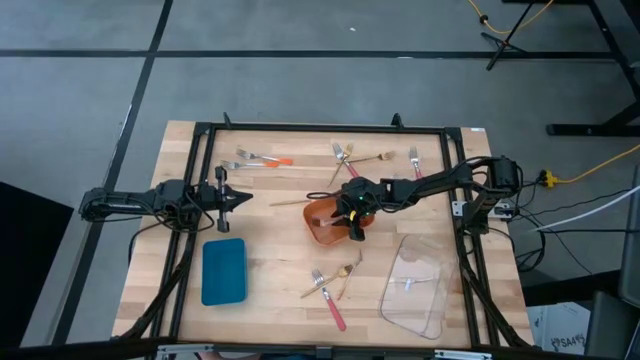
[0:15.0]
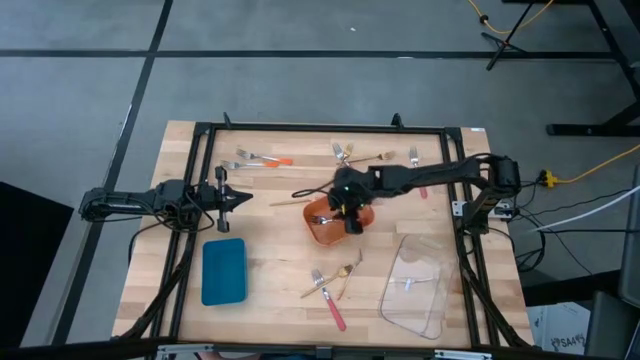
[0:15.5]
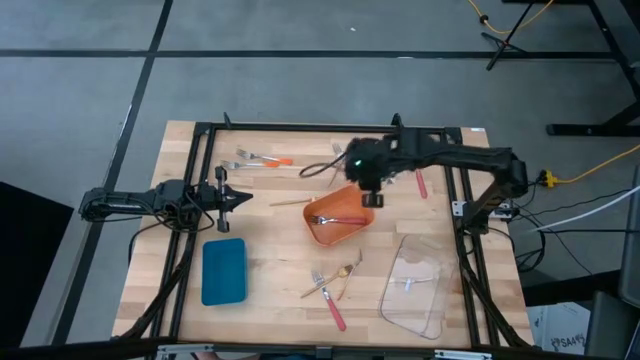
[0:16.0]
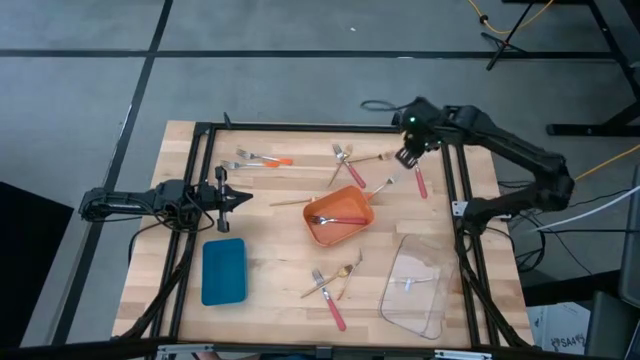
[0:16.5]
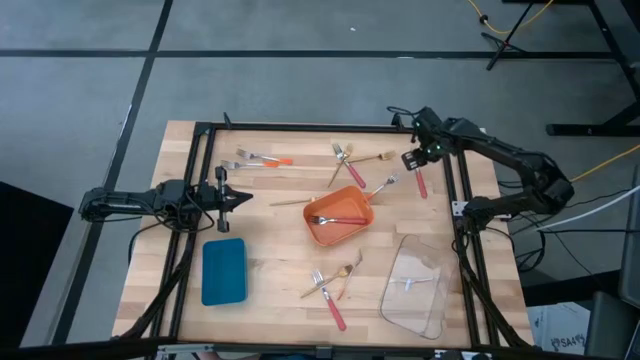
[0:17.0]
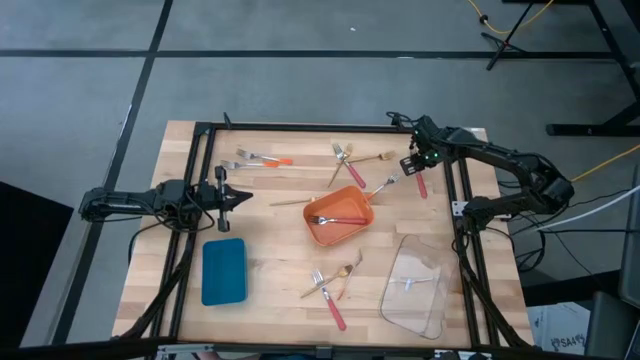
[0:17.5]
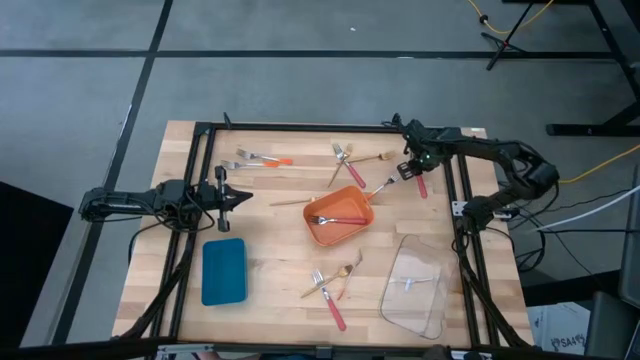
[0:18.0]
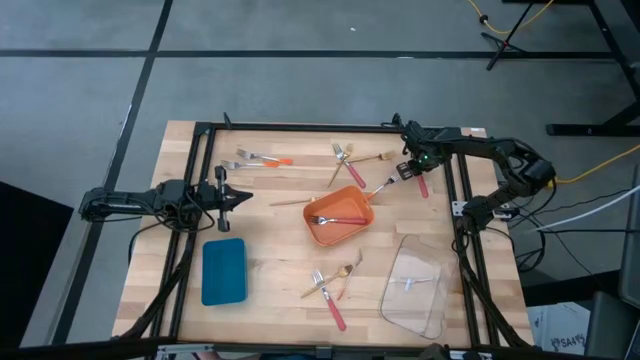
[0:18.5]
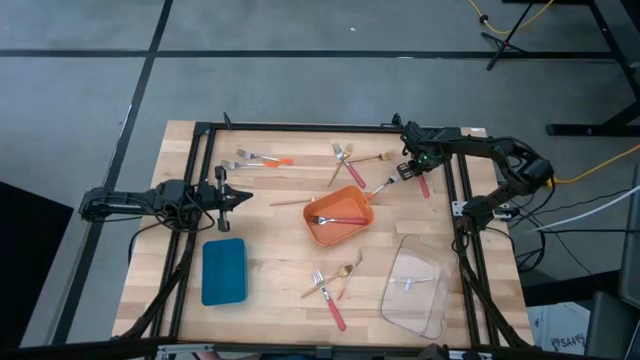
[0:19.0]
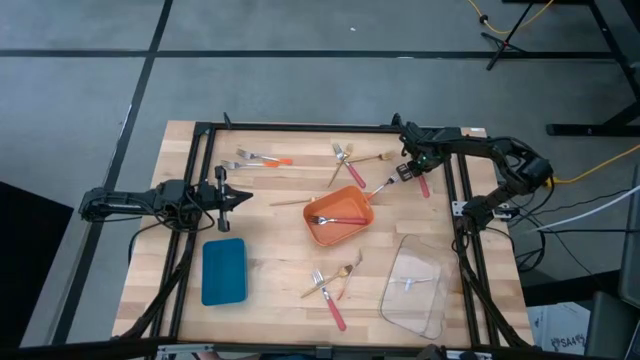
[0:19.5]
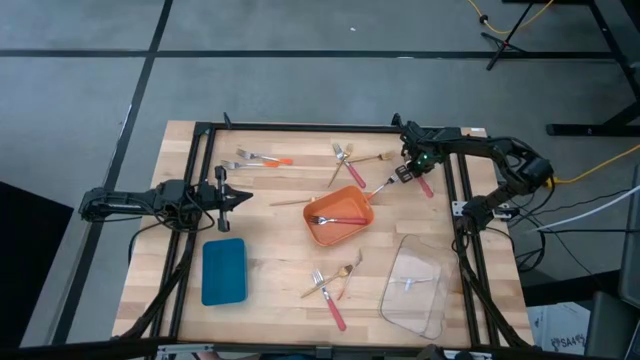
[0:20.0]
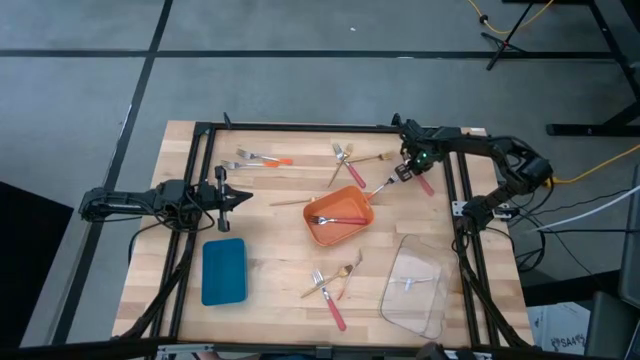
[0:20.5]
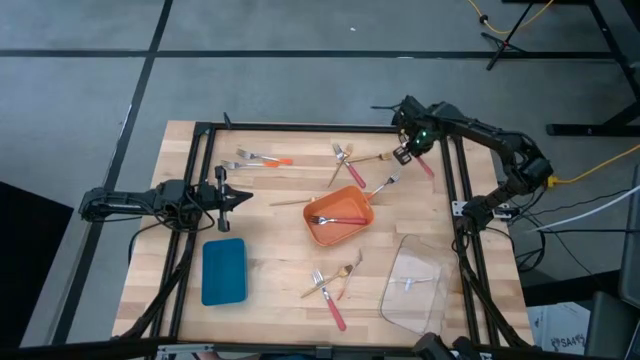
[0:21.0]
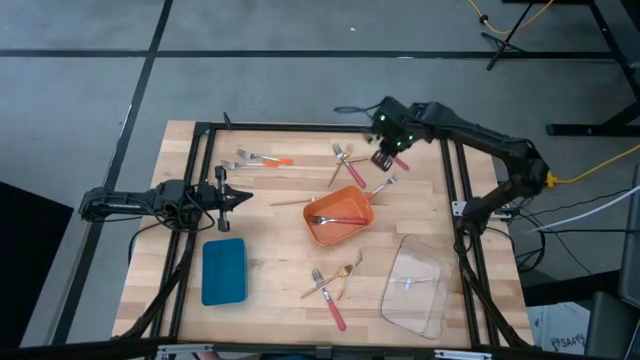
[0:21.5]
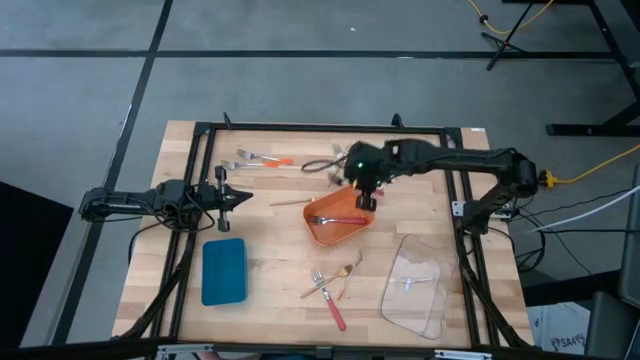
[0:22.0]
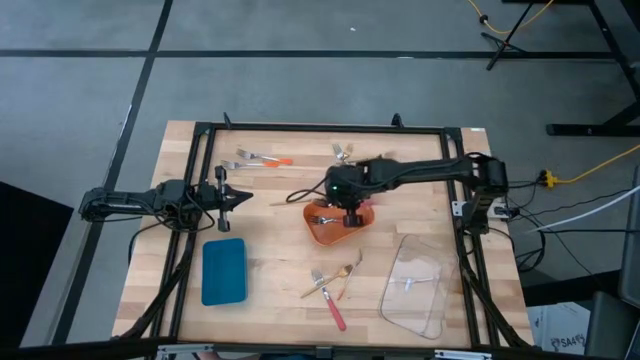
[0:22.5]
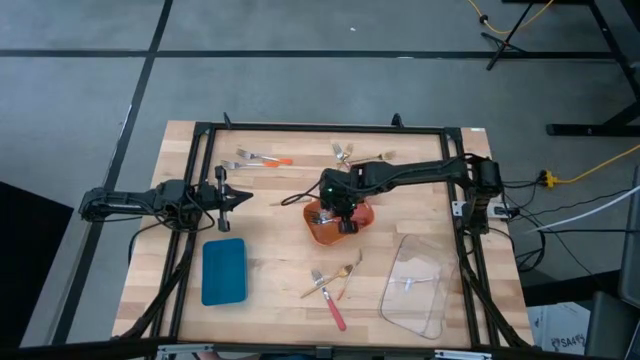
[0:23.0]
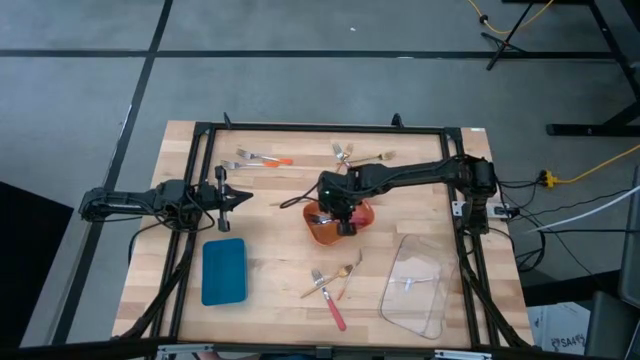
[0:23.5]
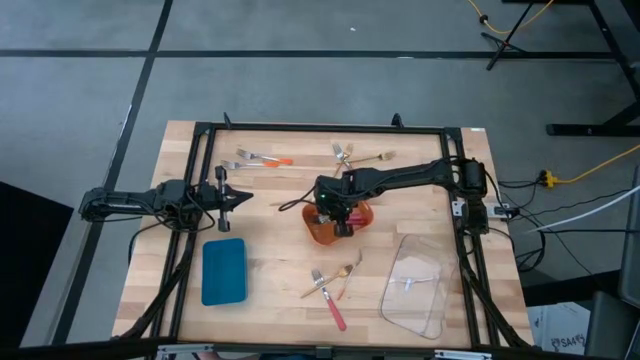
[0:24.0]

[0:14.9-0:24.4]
Task: Sort silverware by color (type)
Put the pink fork into the orange bin

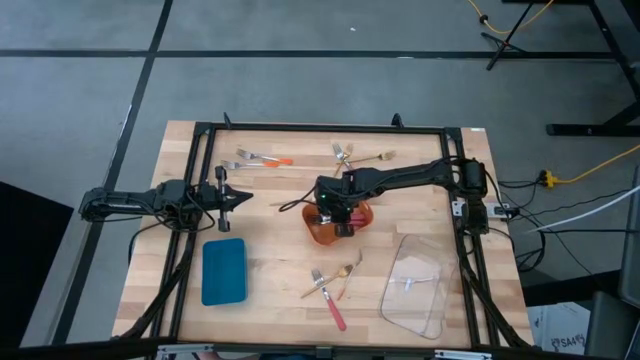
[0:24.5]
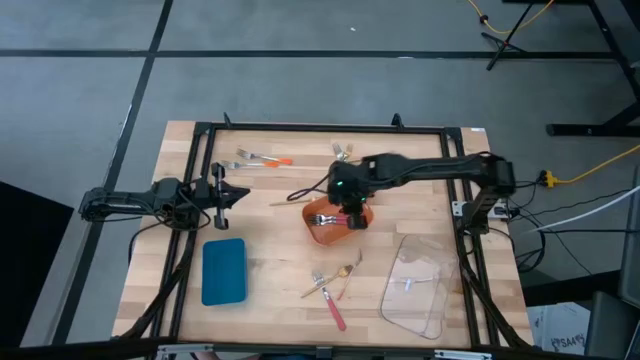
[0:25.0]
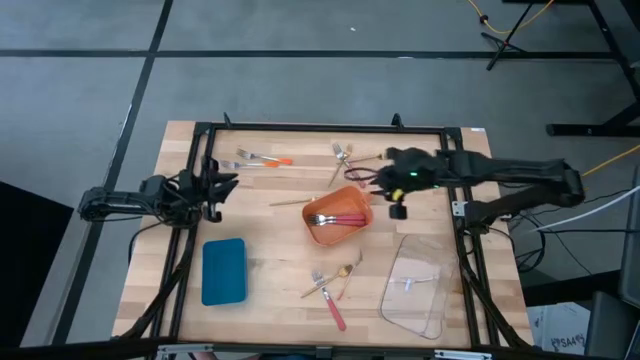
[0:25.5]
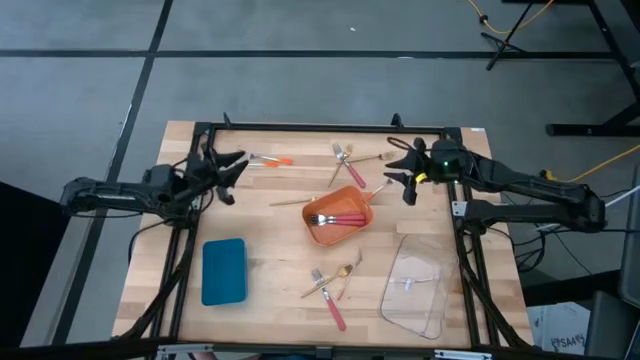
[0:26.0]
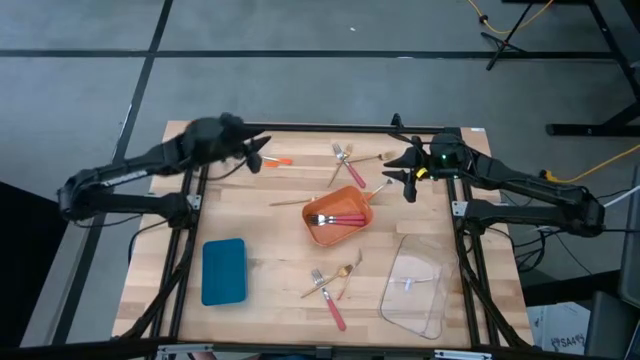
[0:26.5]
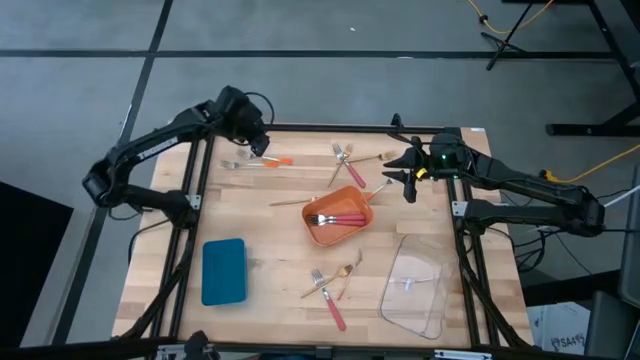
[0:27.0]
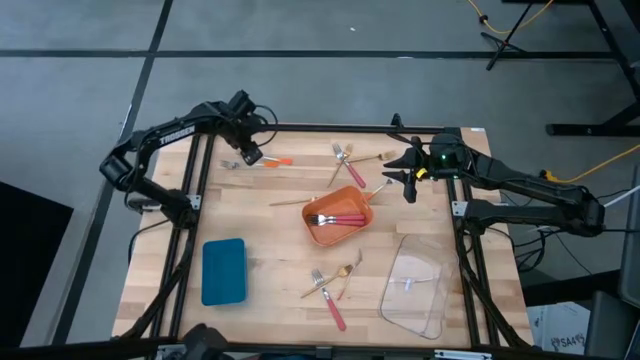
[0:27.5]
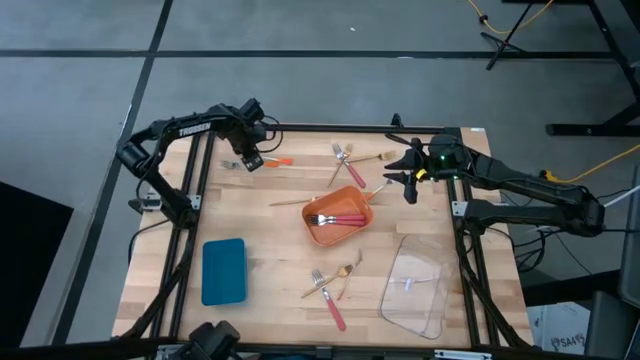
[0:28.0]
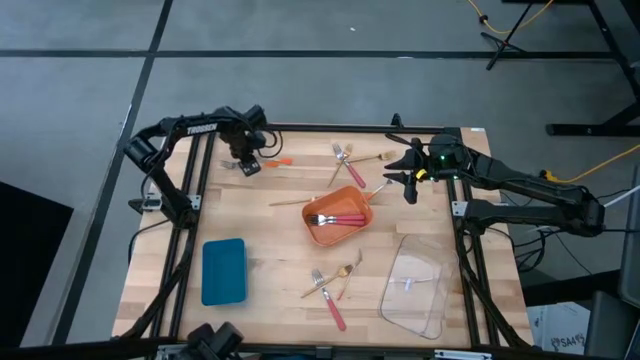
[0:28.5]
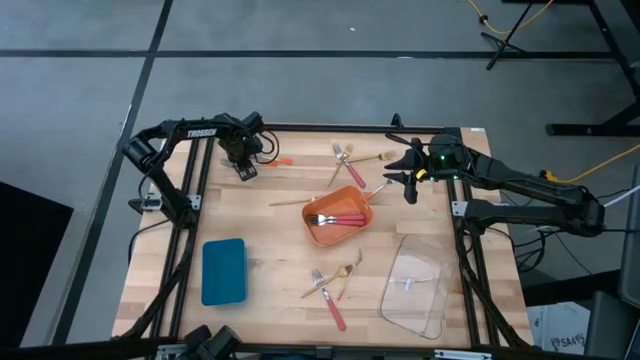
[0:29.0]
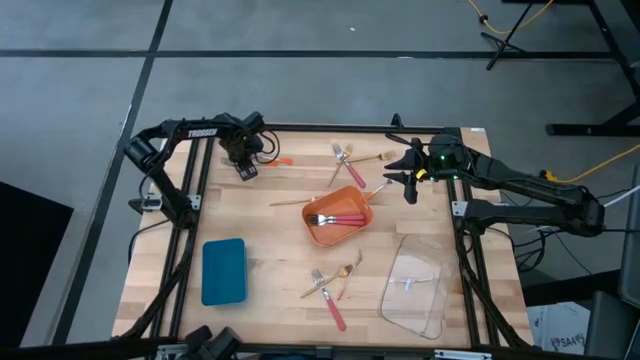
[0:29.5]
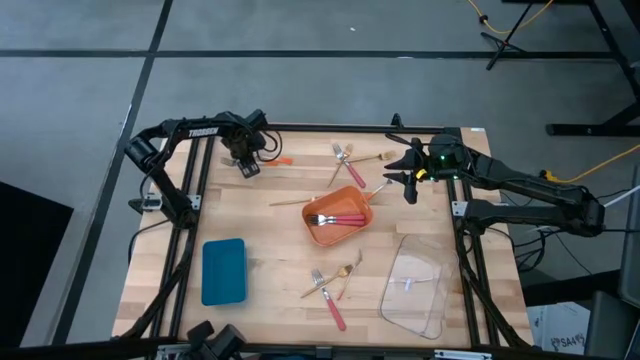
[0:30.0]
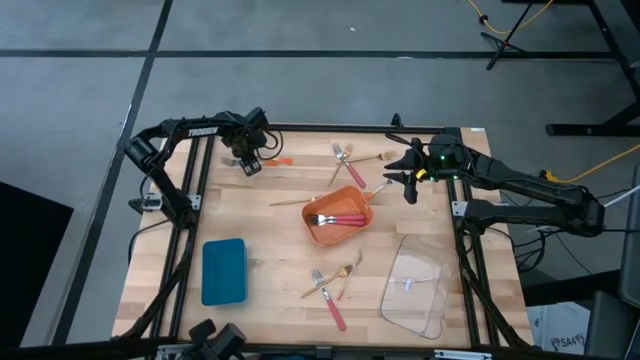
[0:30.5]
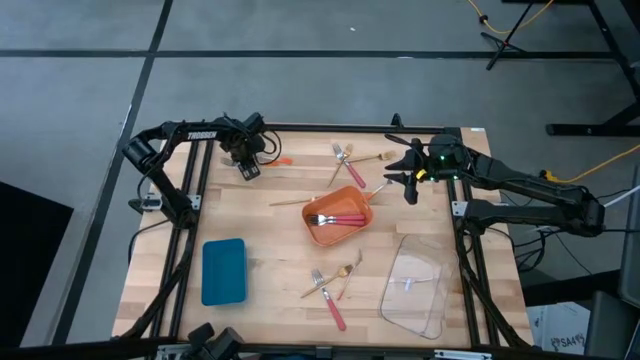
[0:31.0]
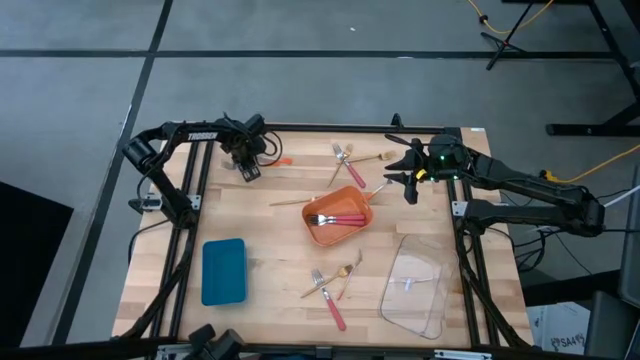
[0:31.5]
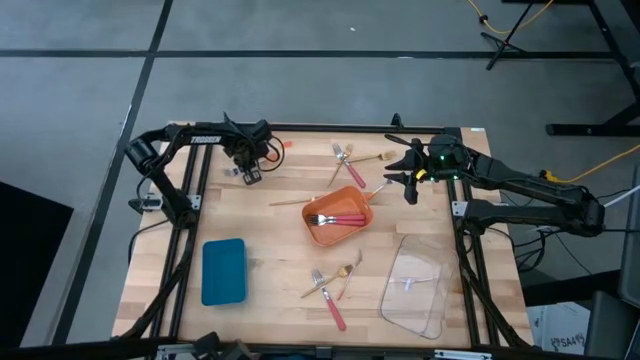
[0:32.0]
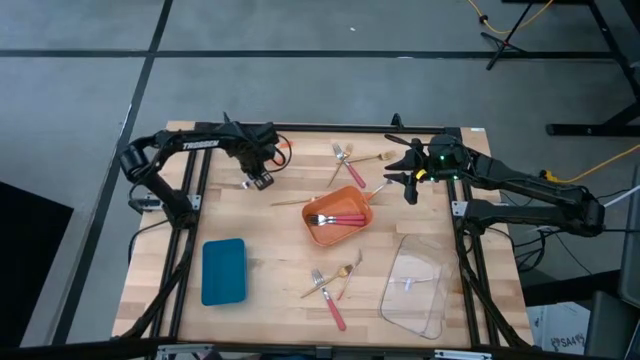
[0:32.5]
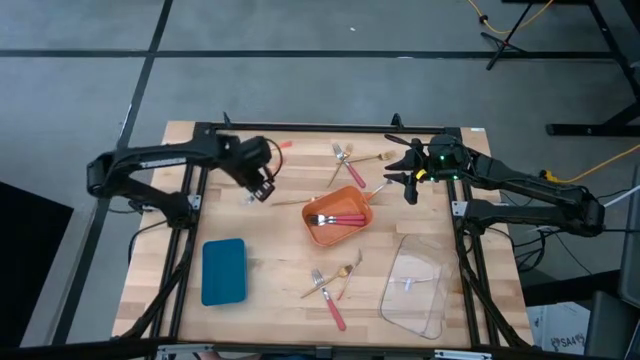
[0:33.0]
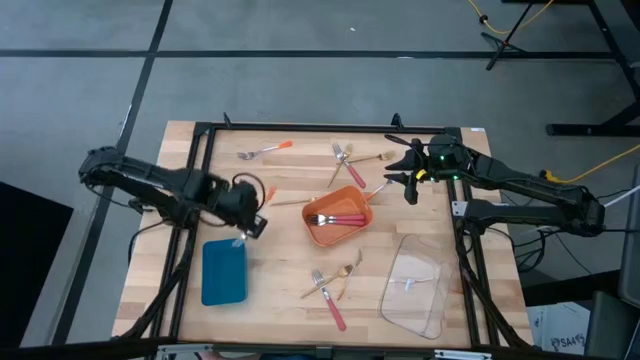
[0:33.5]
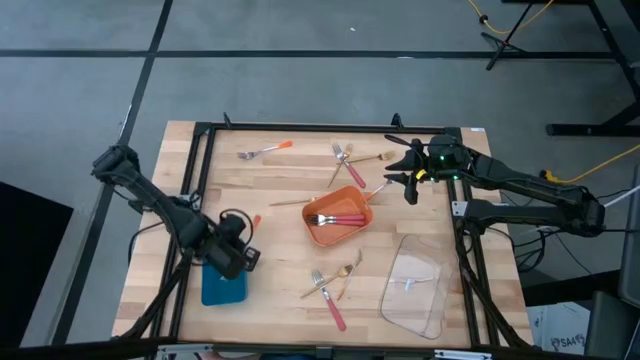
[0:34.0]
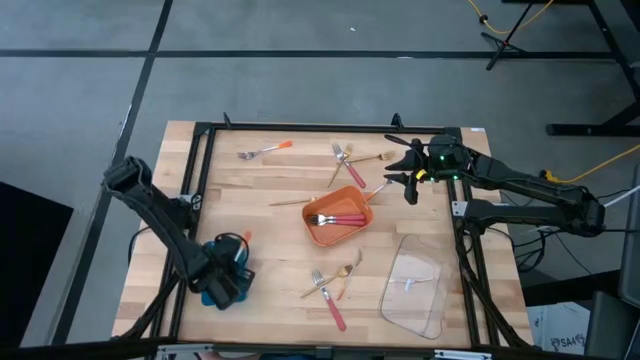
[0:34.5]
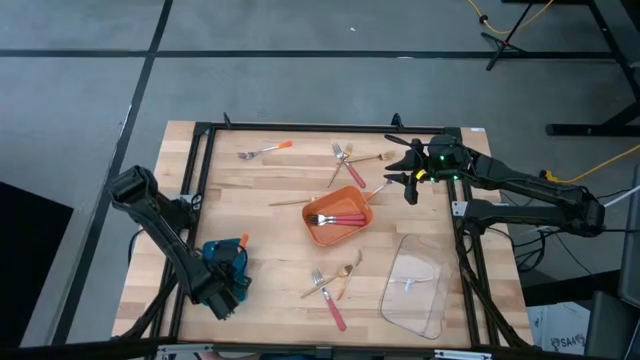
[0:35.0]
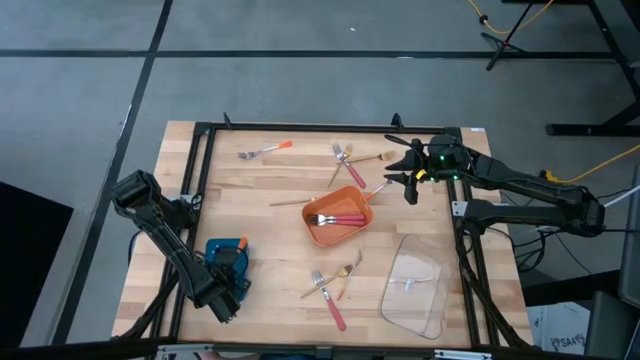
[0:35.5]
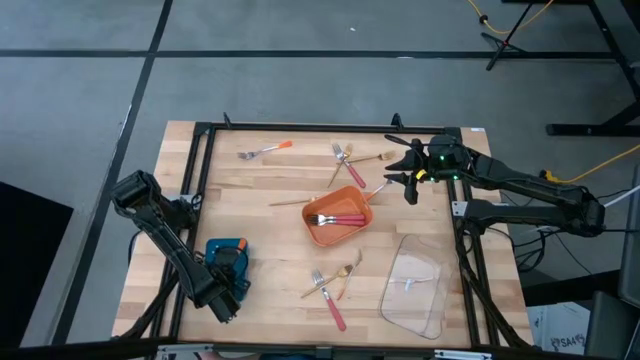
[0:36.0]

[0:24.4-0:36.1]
Put the orange fork into the blue bin
